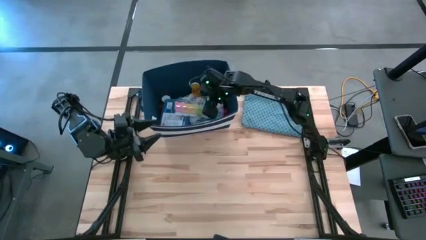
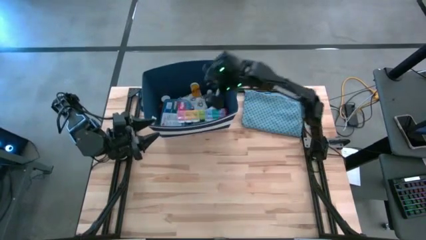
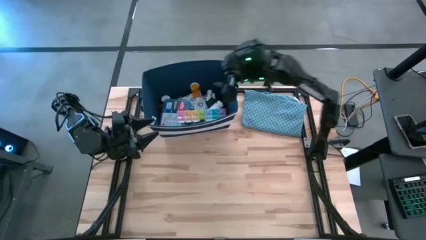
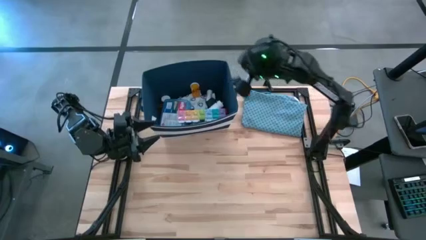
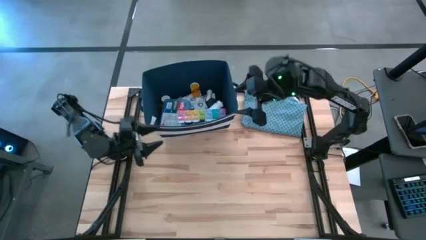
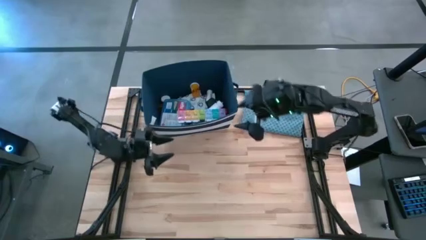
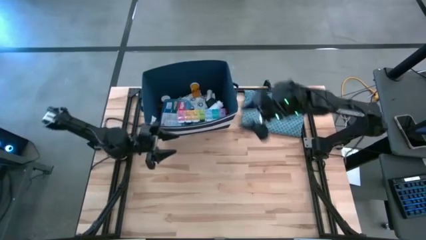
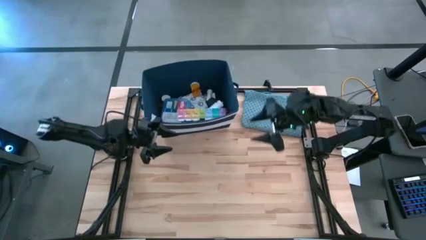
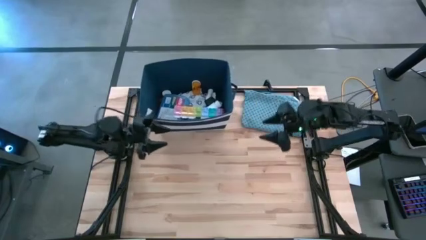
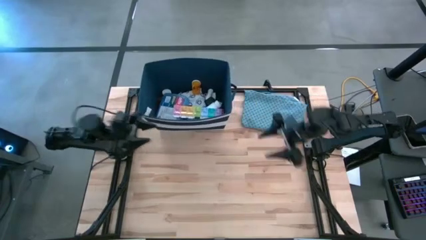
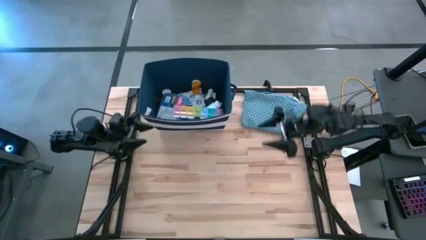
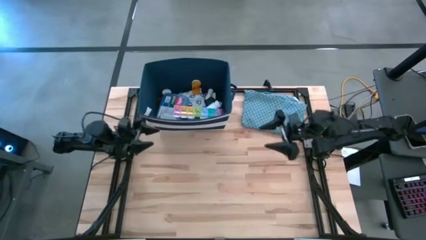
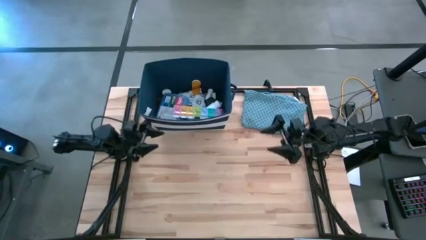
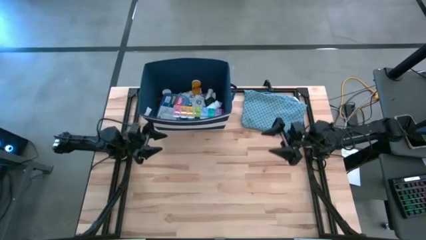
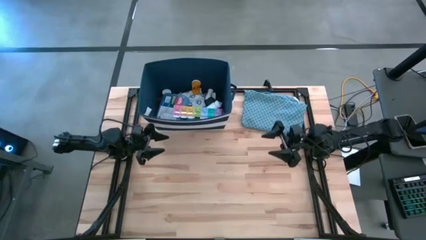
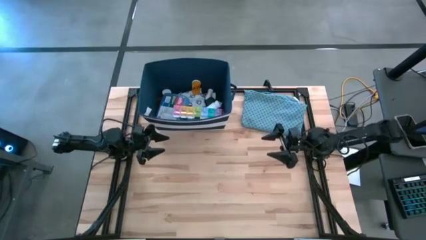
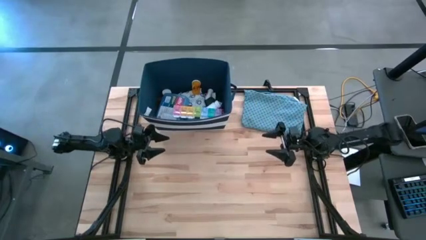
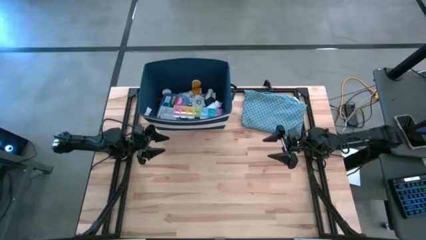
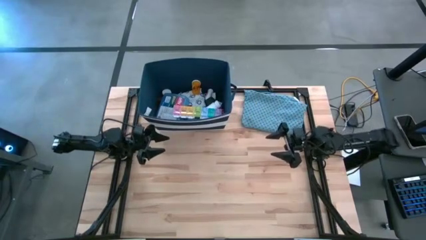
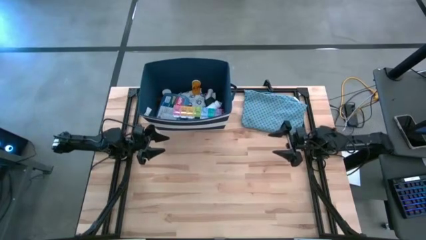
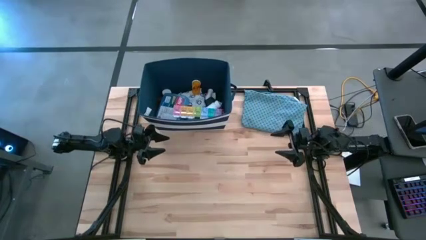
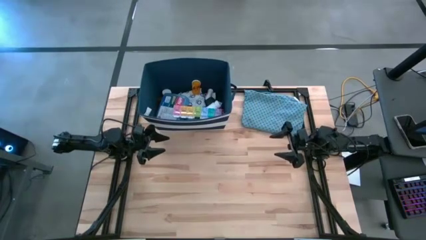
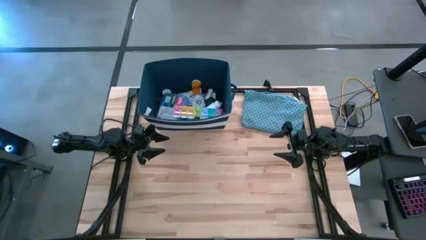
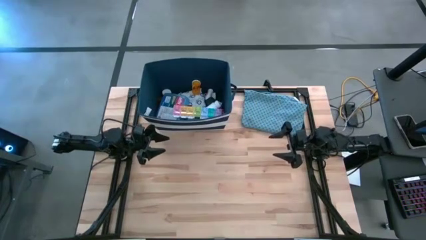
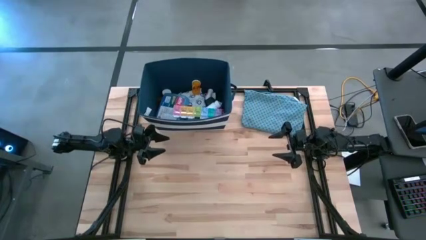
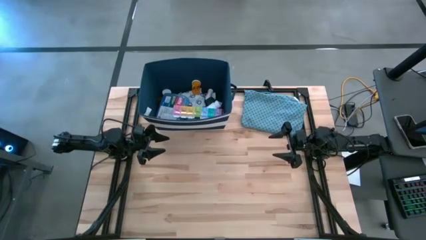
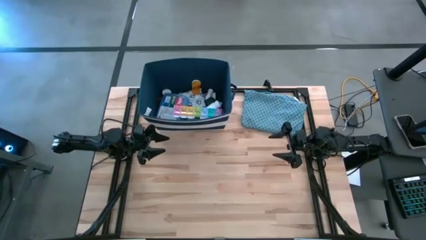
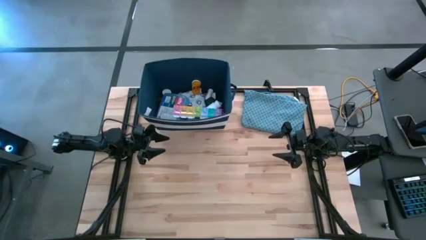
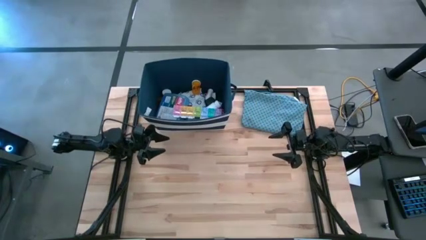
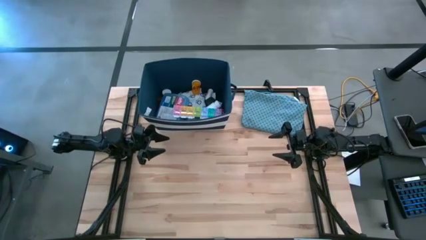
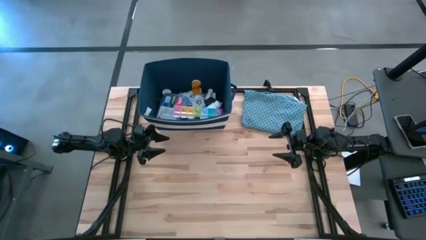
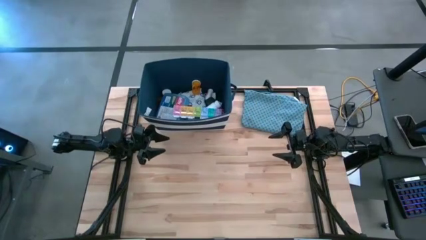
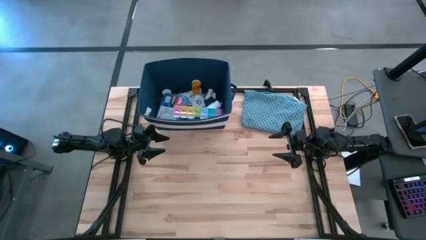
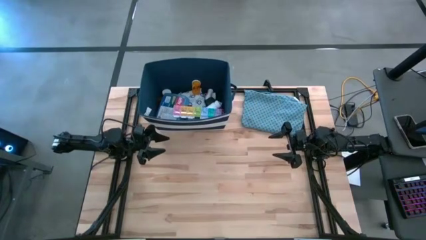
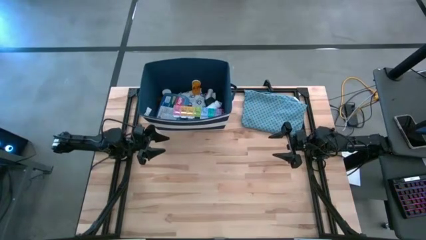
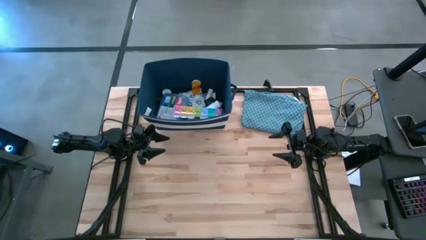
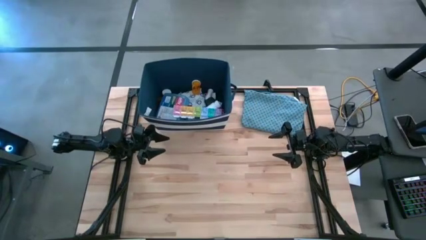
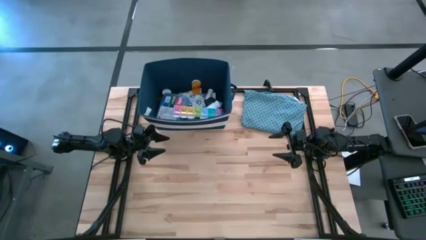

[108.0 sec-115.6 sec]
Task: Pick & place medical supplies in basket/bin
Return to Home Position

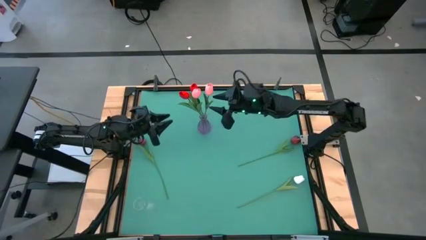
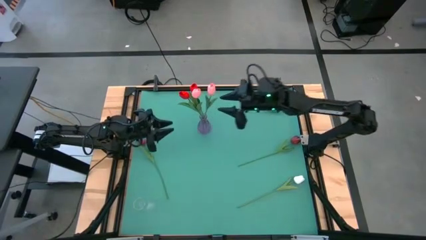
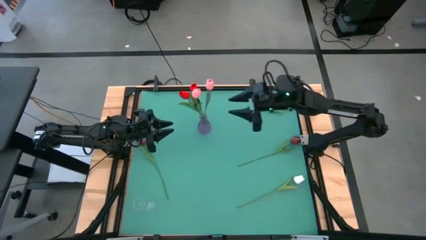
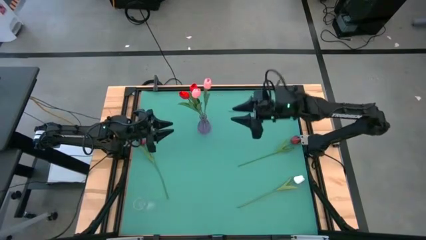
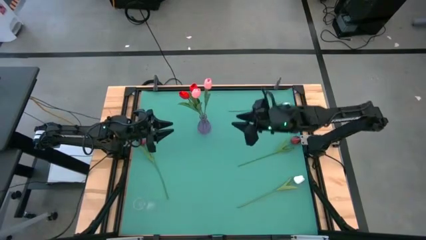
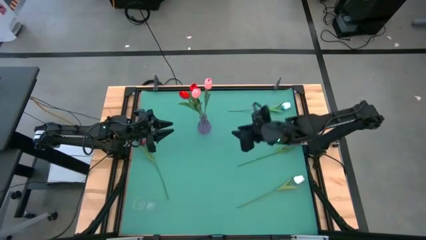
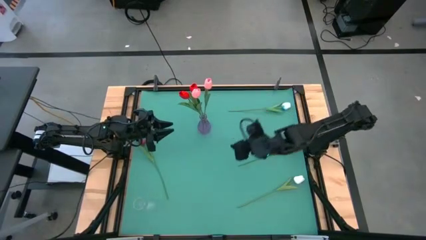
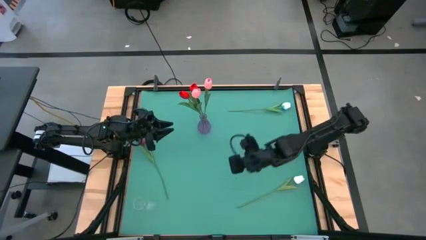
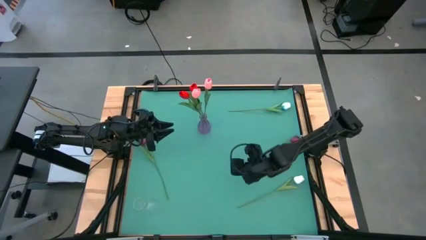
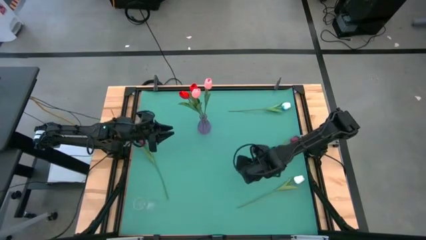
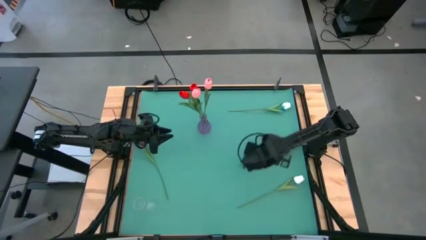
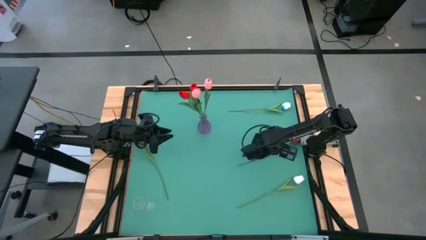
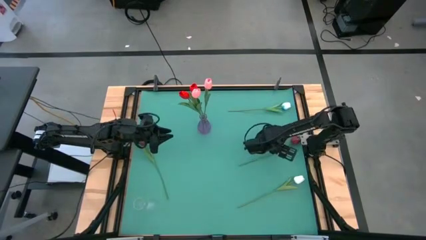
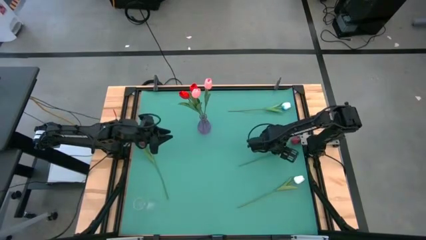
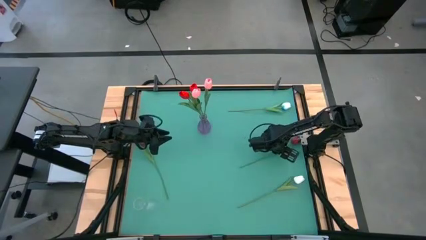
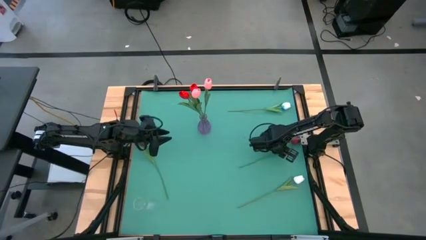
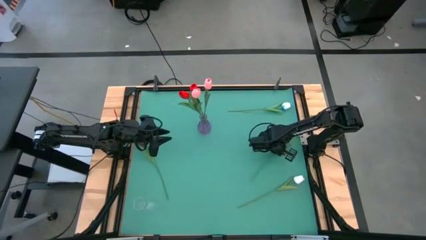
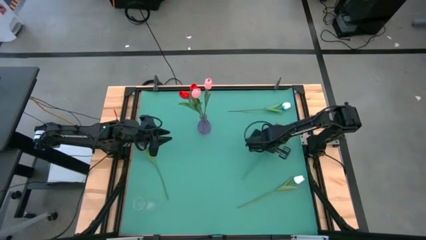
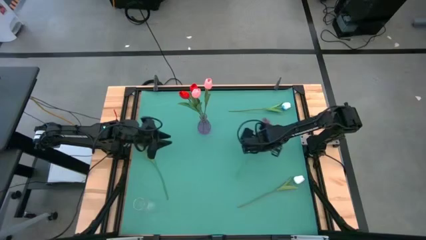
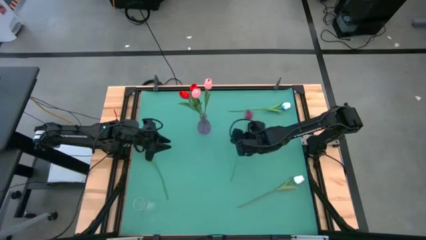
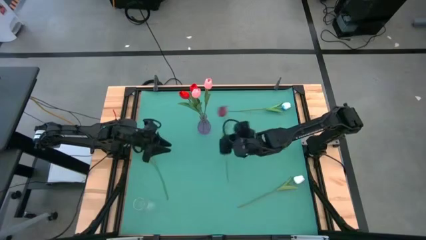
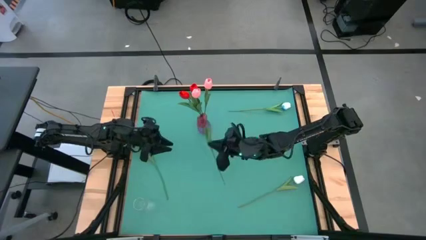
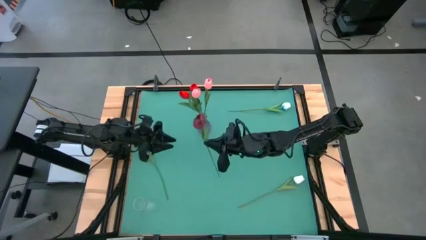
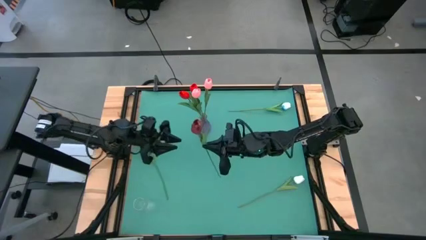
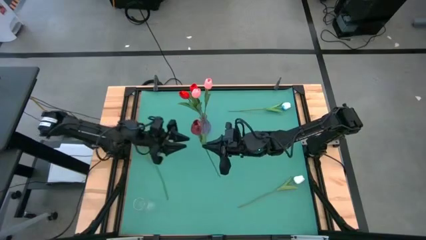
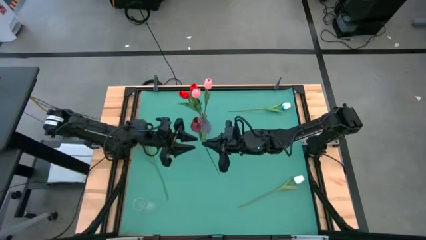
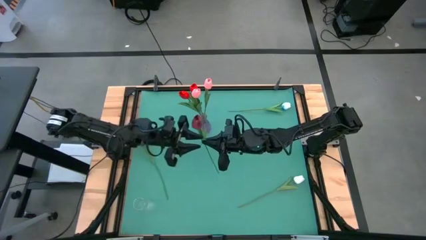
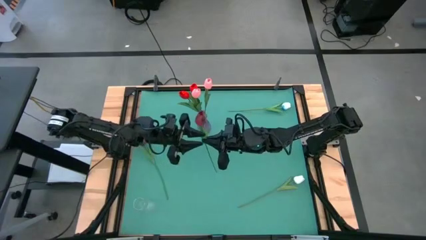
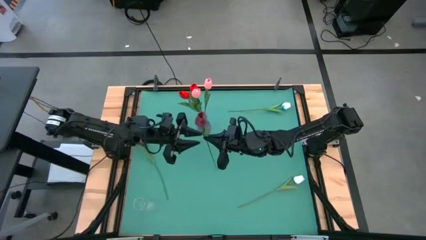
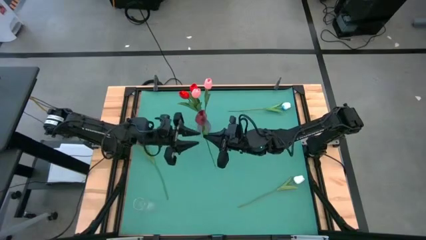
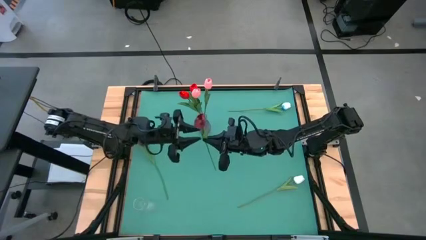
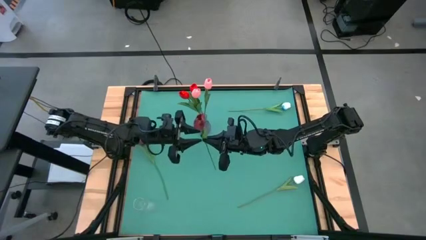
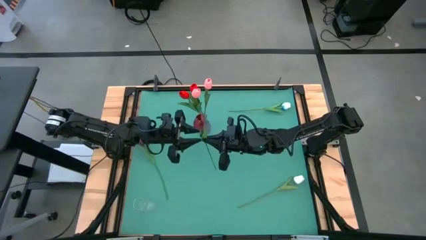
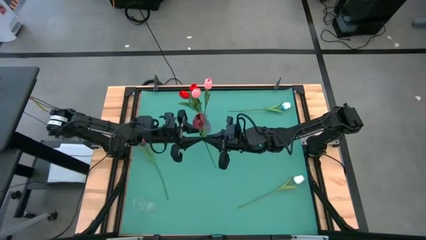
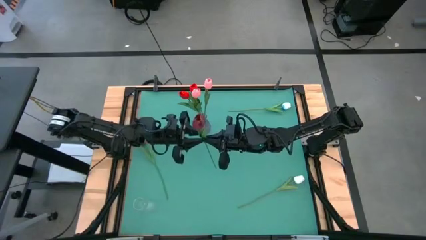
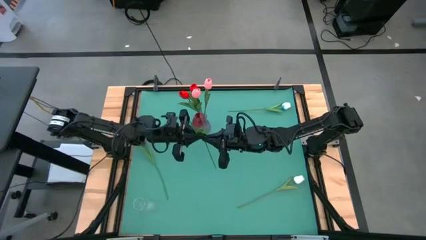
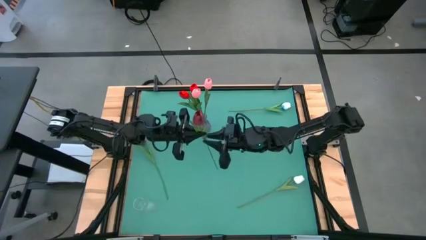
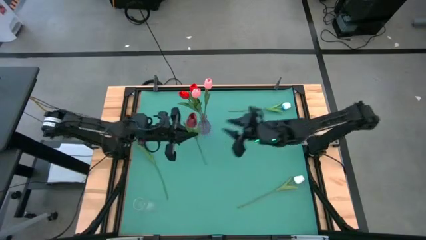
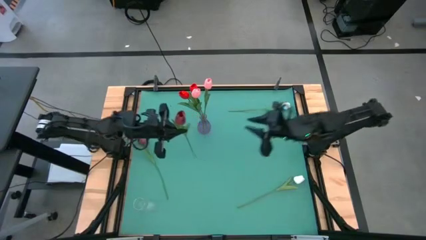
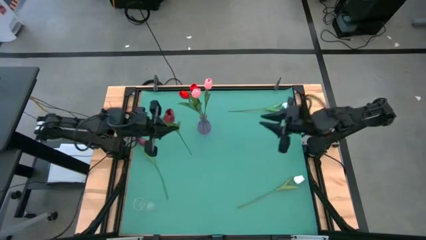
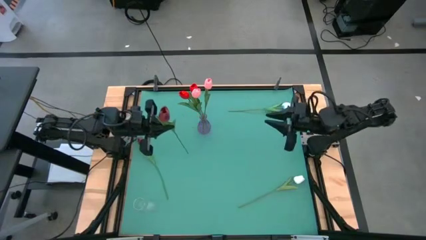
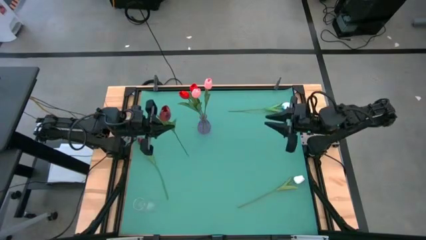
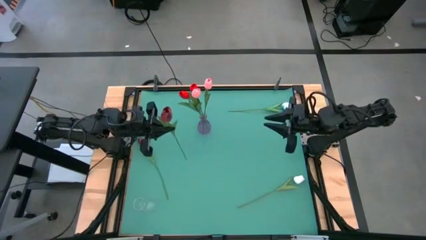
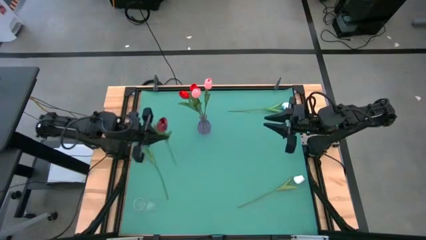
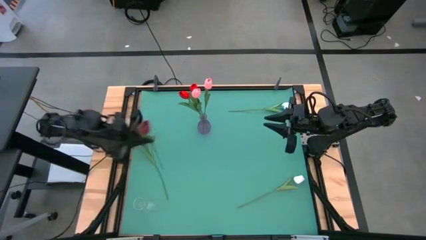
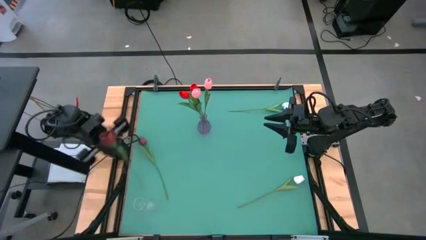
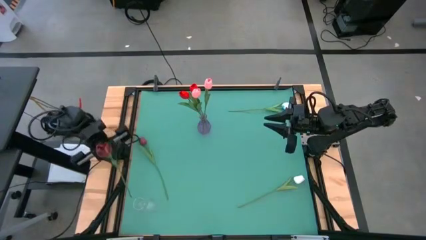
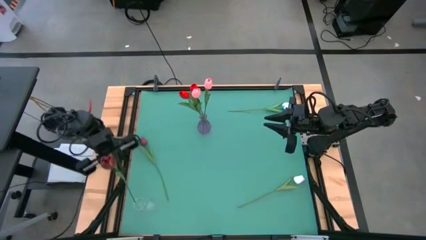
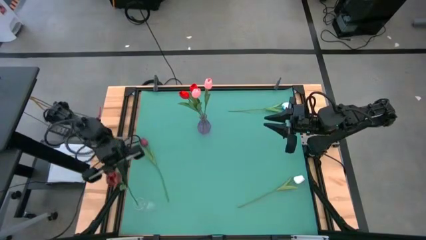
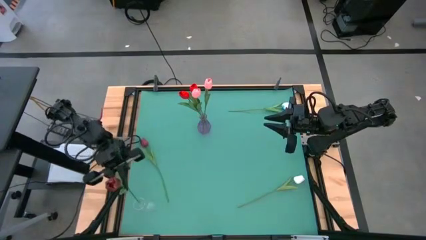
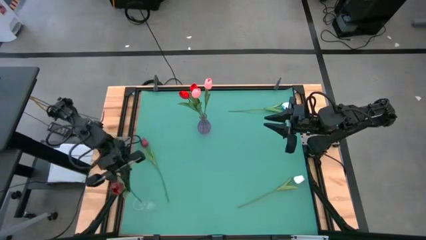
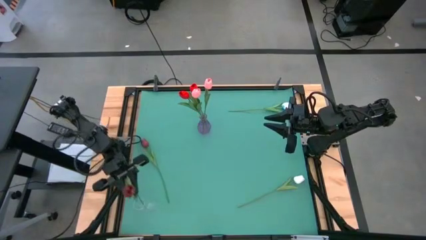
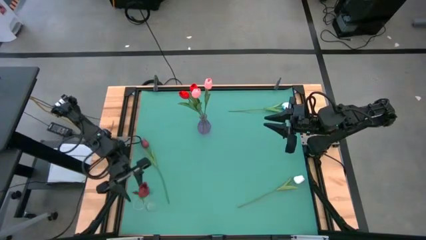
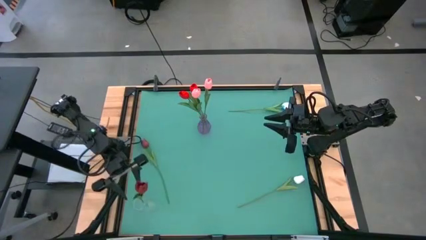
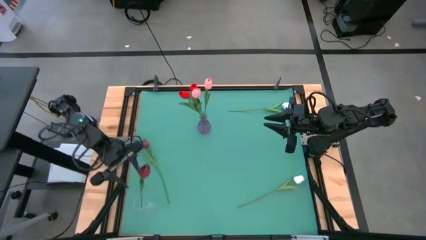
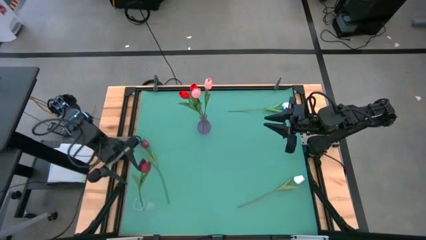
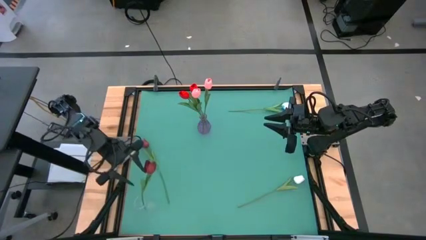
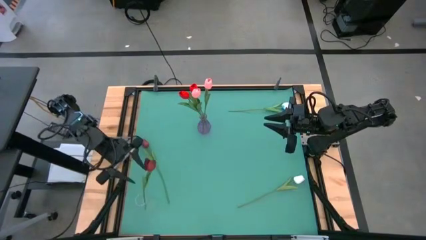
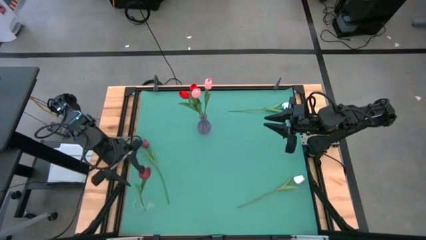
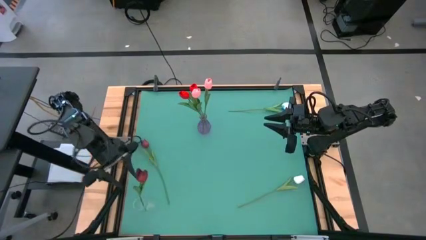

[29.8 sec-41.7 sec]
Task: Sort flowers into vase by color
Put the right dark red flower into the transparent vase
